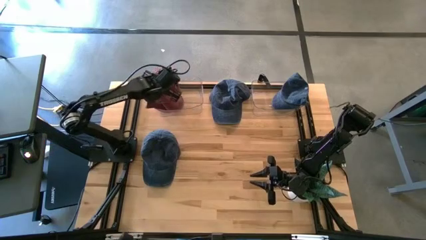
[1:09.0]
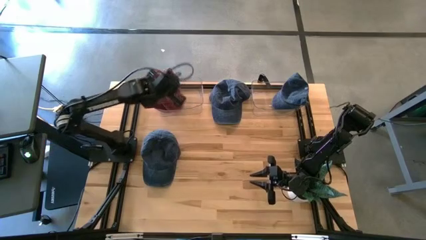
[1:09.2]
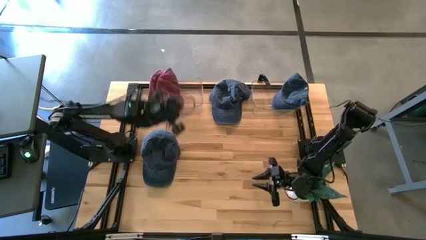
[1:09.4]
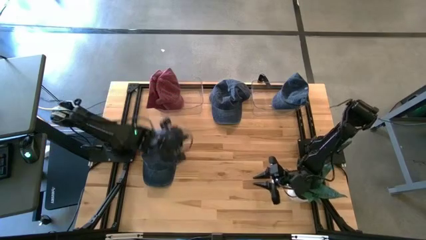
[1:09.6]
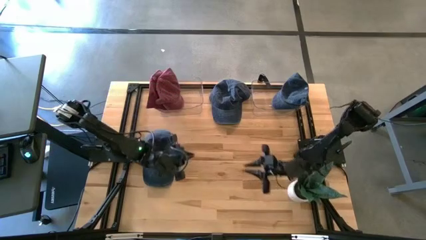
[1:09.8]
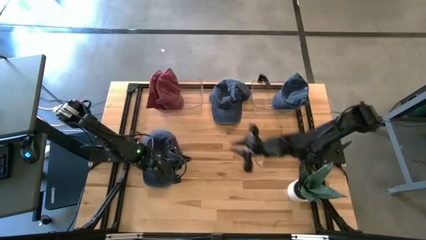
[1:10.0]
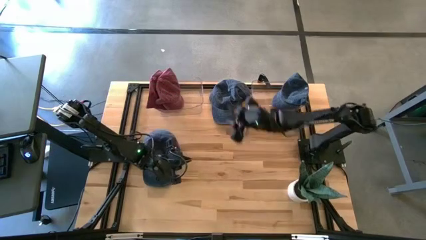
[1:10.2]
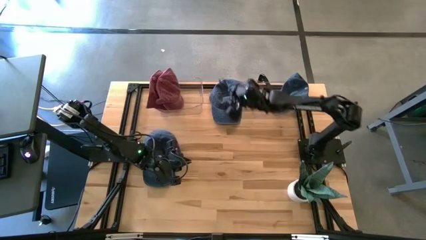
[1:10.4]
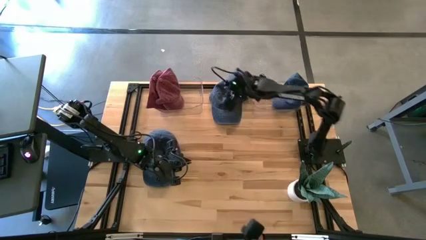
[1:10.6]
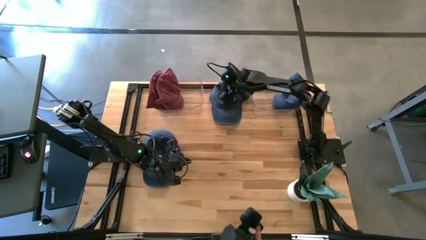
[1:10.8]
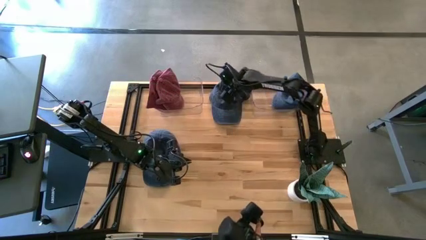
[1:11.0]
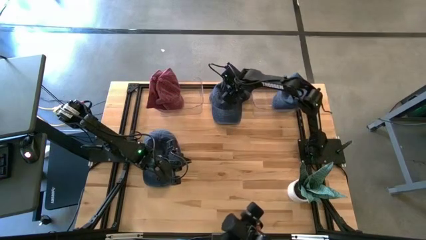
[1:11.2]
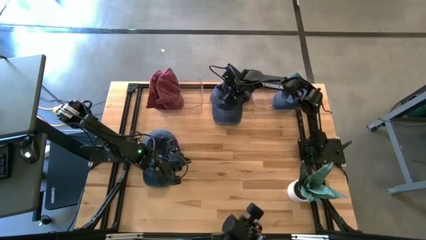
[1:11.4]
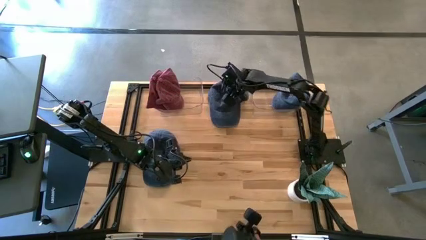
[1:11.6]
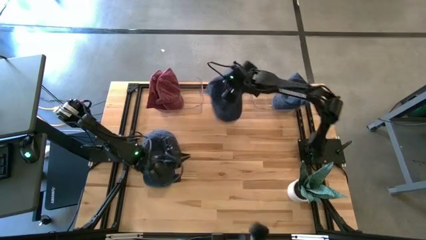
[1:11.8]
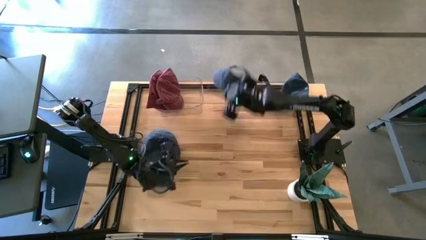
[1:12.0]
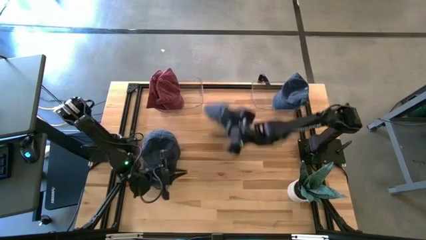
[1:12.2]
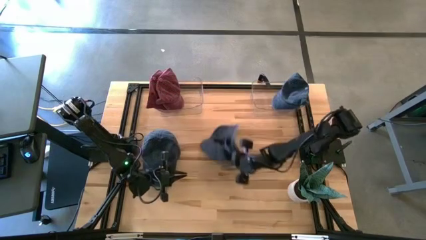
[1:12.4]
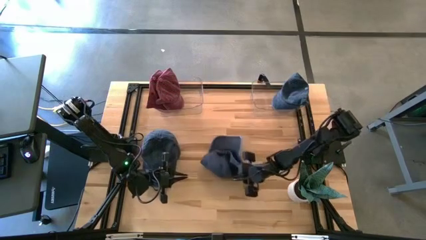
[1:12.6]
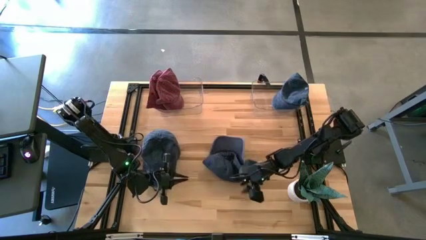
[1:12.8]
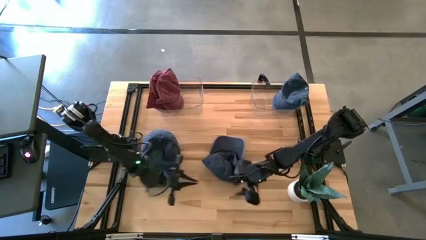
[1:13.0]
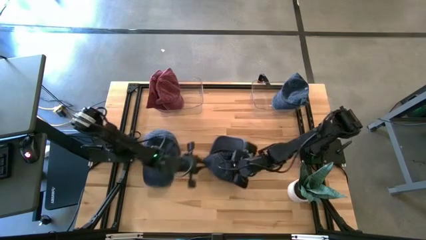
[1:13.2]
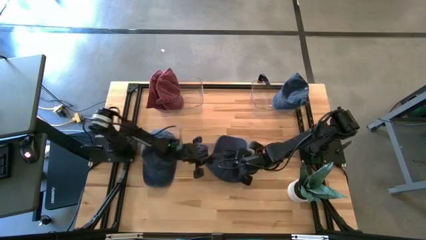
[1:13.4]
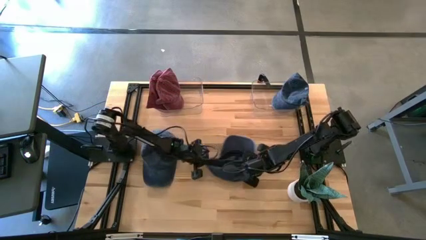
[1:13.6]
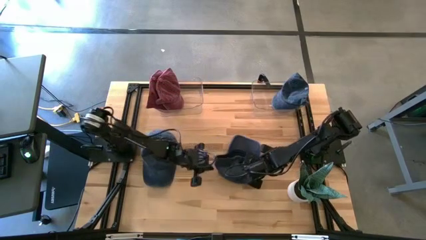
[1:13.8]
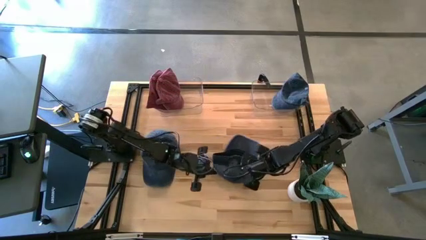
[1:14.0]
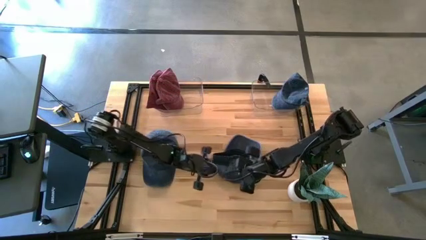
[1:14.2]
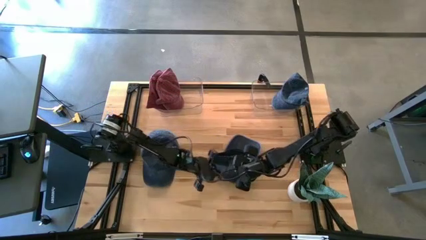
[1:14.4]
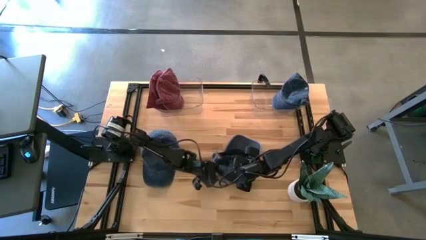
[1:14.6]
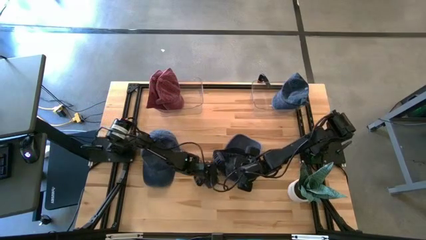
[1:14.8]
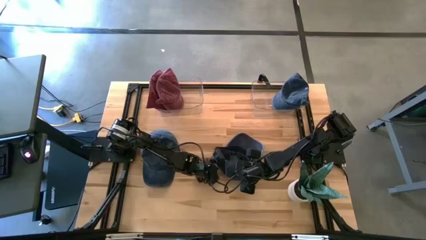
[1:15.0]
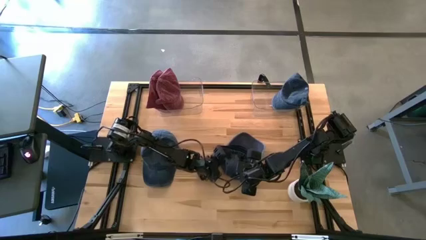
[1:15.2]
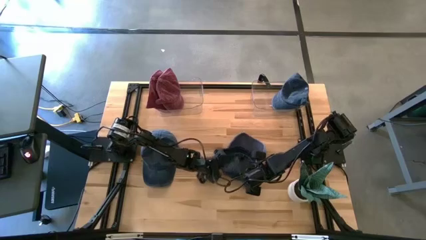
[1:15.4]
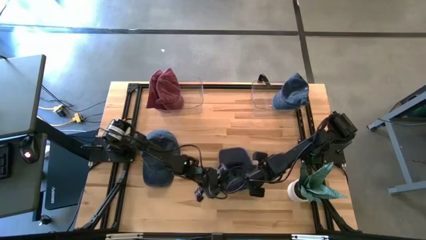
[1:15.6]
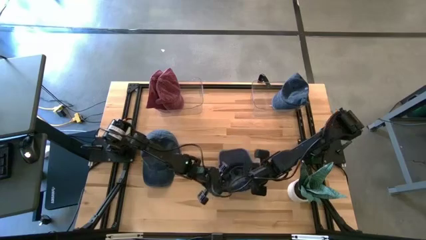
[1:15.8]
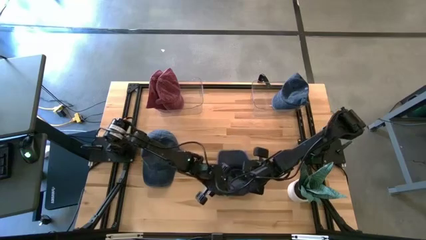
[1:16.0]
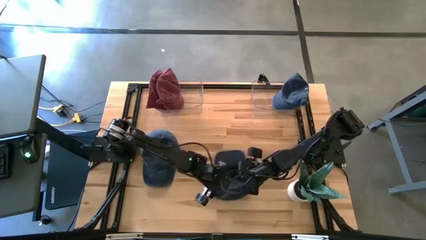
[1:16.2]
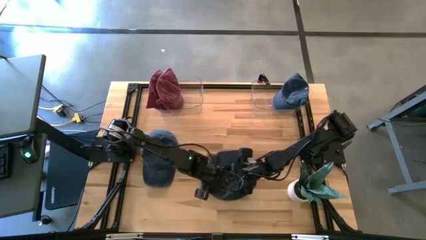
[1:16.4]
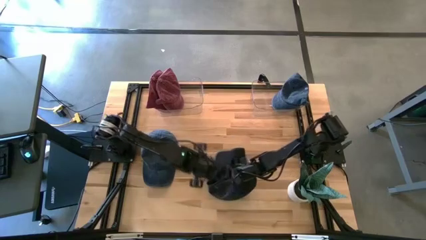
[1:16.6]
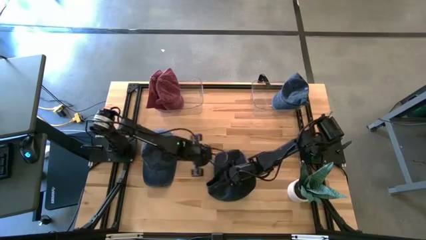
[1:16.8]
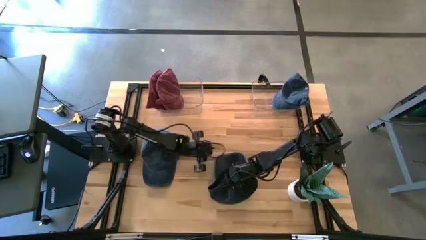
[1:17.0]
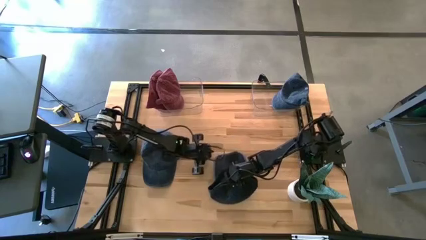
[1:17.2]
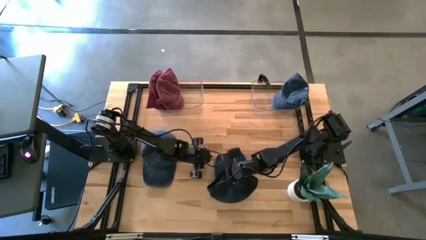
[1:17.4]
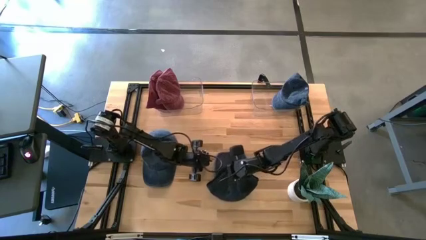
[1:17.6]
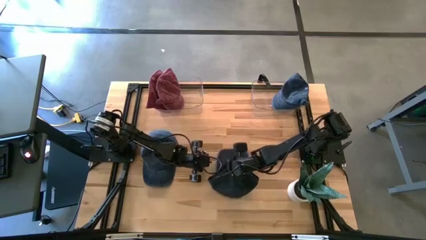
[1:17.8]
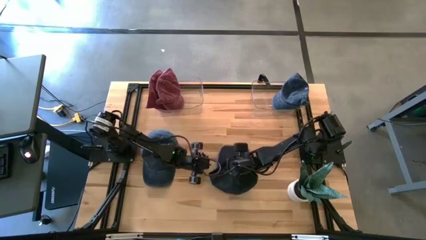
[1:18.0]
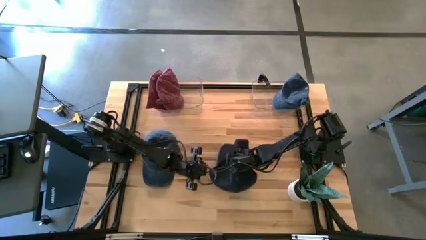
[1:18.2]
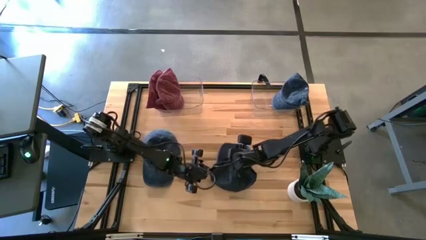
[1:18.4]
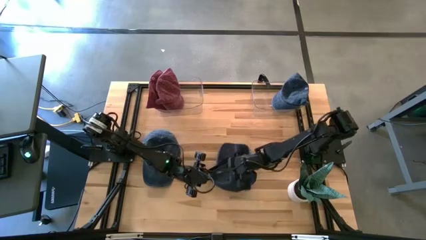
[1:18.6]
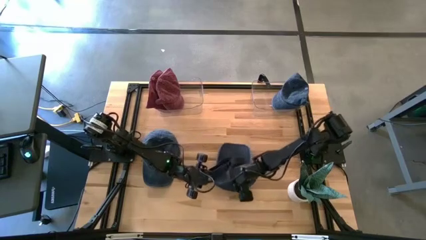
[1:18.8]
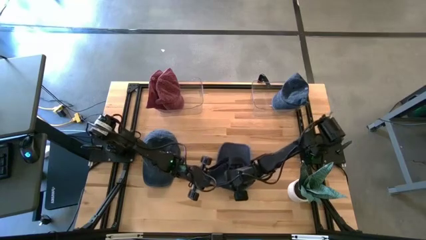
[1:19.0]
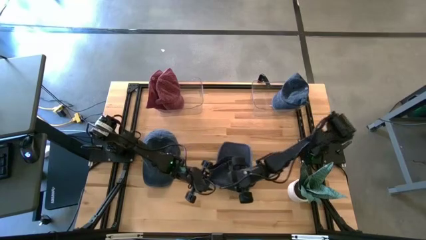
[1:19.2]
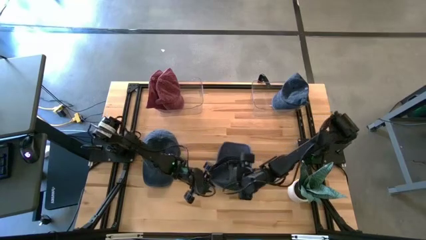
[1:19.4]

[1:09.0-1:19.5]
Task: Pick & Place hat
Put the top blue cap into the right transparent bin

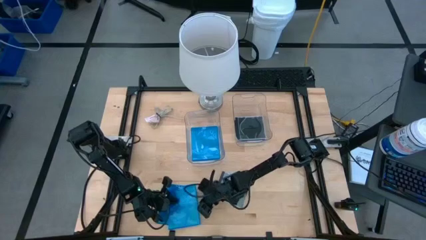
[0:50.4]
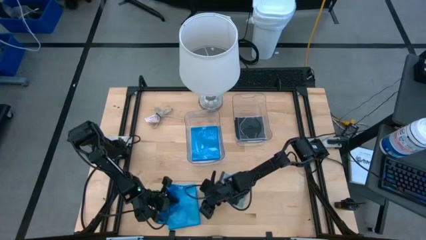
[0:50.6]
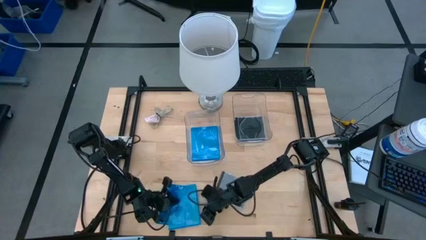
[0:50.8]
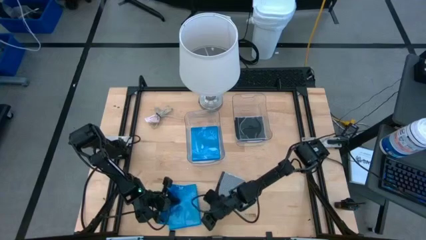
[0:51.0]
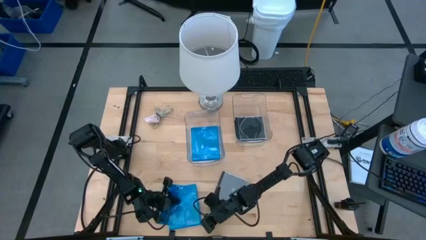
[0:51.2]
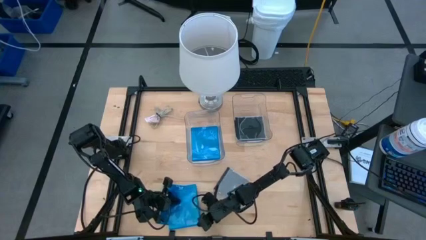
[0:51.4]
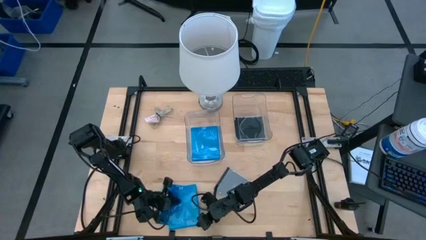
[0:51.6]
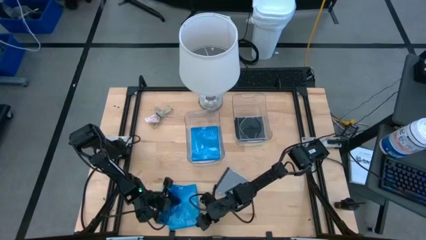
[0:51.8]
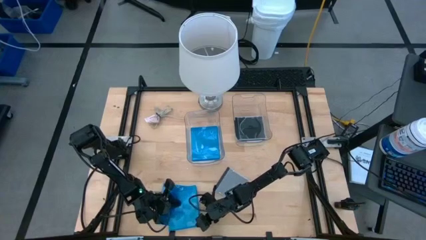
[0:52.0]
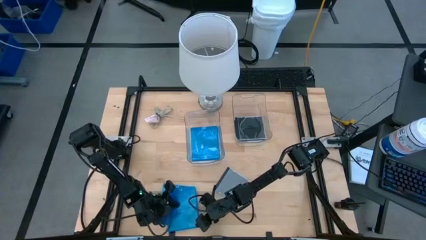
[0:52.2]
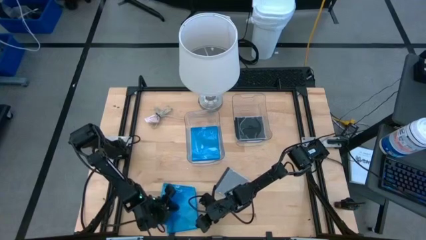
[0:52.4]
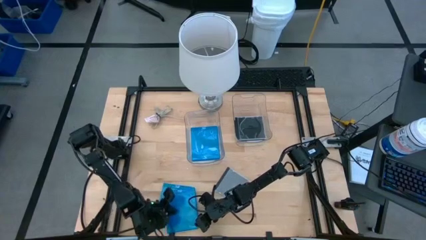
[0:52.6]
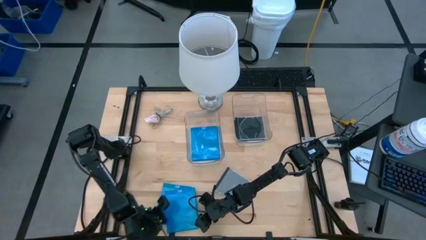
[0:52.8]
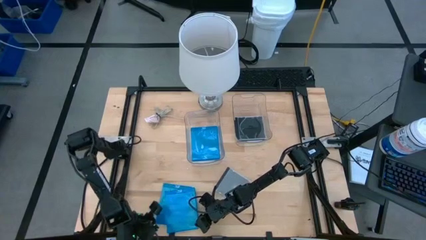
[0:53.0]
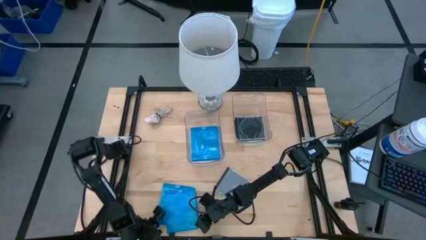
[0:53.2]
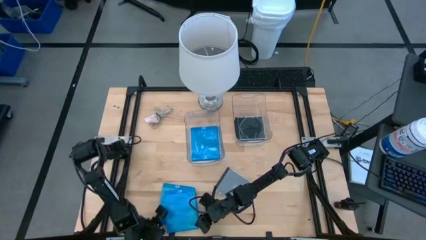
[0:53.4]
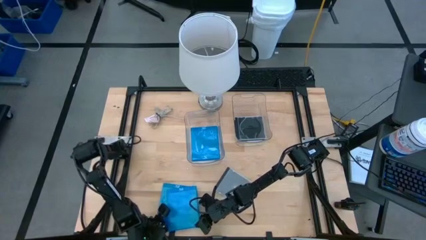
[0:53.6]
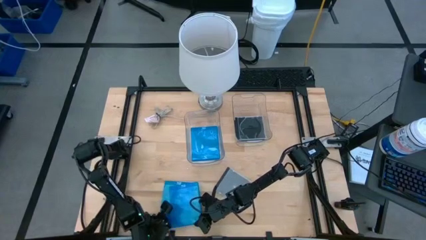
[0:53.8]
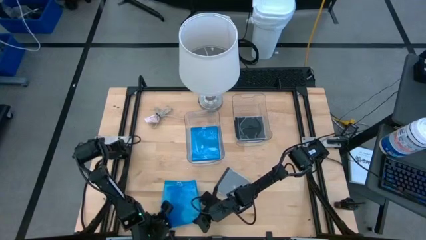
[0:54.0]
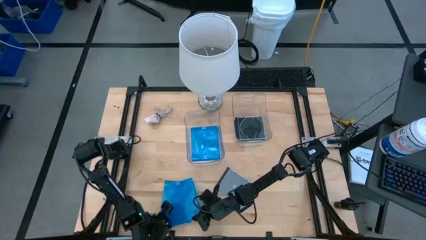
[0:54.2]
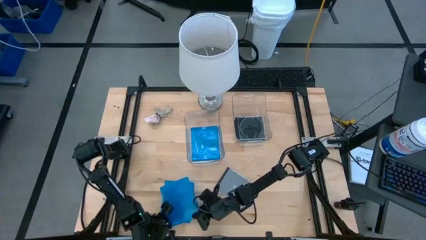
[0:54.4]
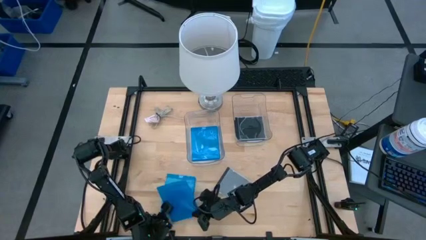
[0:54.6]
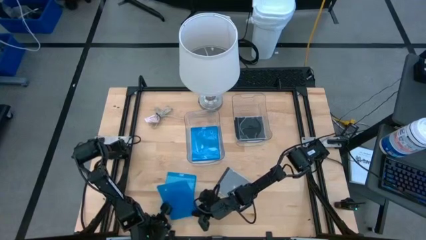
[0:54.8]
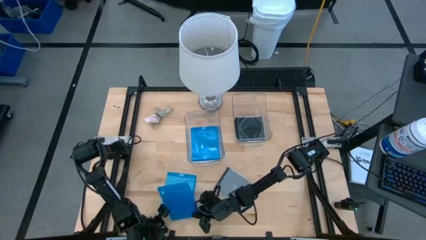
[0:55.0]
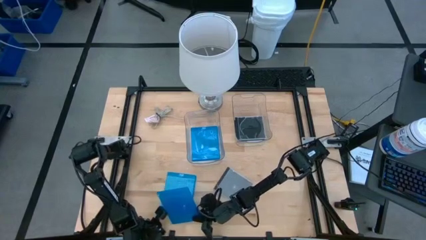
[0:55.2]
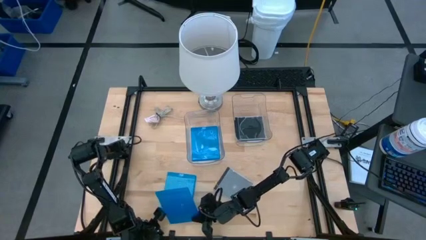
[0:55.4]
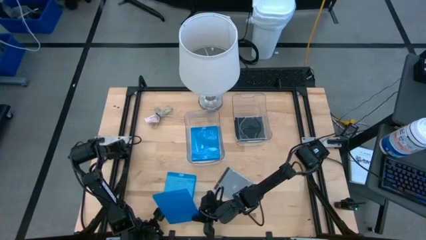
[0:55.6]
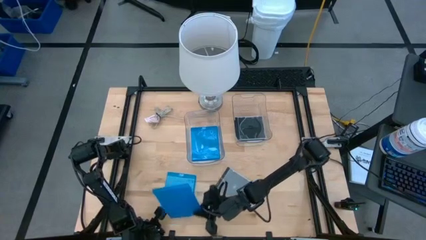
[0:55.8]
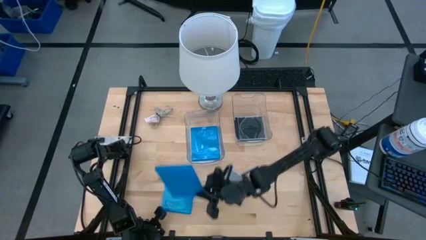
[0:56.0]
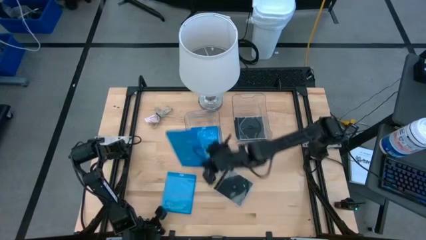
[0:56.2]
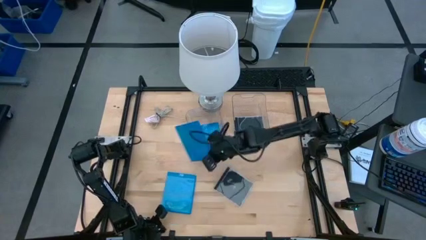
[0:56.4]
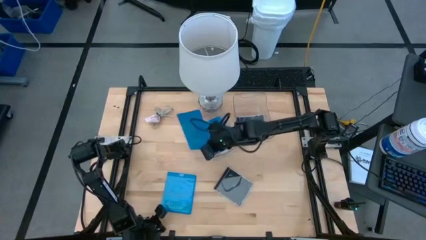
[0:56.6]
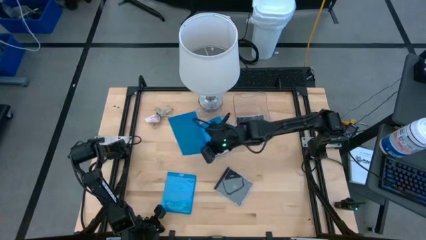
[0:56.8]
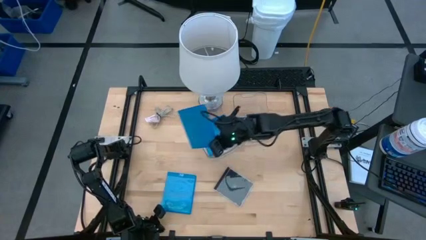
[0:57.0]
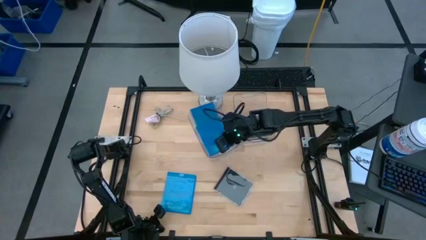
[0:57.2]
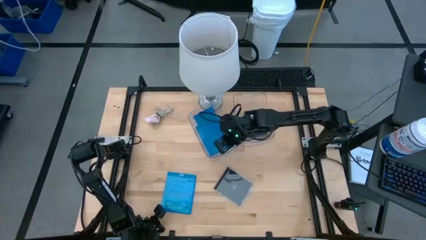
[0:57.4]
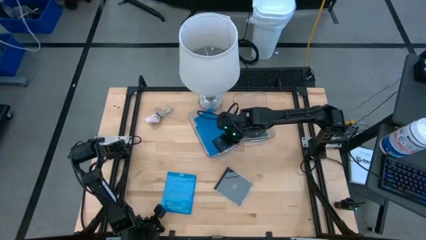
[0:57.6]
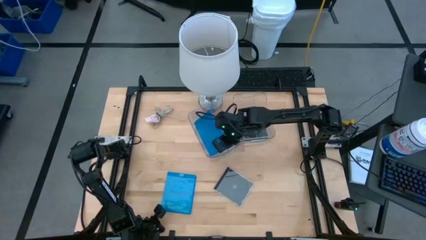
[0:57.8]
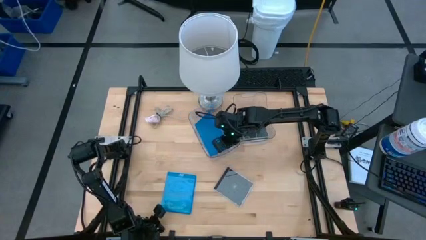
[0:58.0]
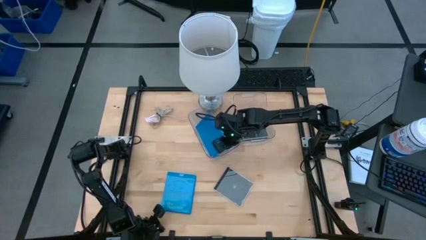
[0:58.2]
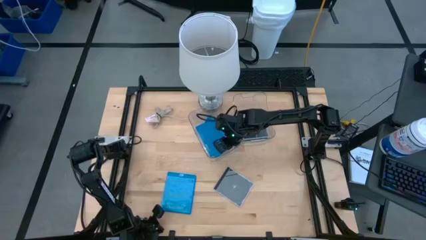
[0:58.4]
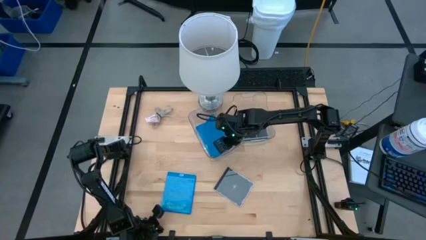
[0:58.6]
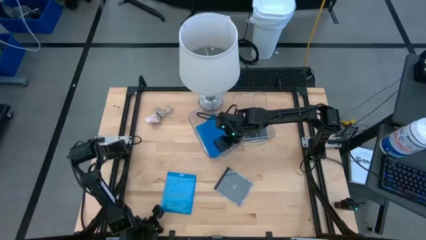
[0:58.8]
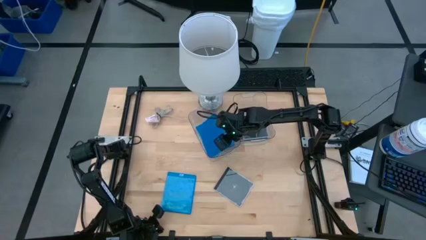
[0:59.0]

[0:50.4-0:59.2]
Task: Pick & place jewel cases by type
Put the blue cd case into the left transparent bin
